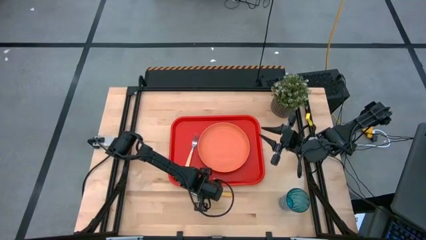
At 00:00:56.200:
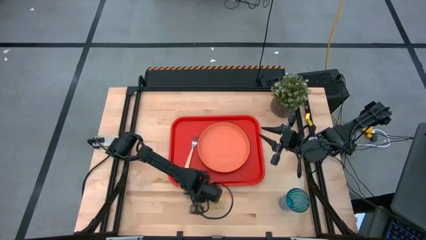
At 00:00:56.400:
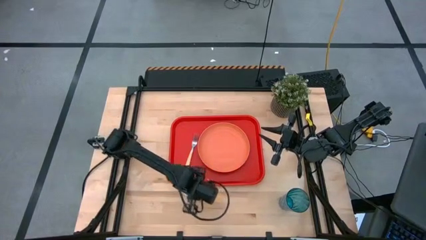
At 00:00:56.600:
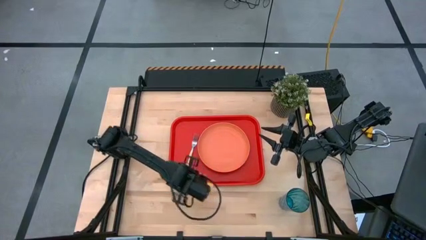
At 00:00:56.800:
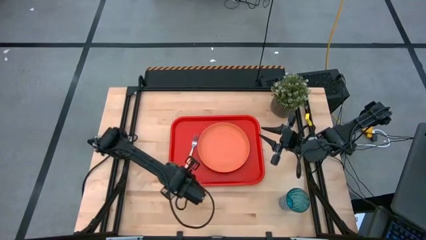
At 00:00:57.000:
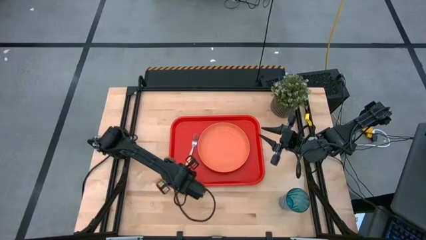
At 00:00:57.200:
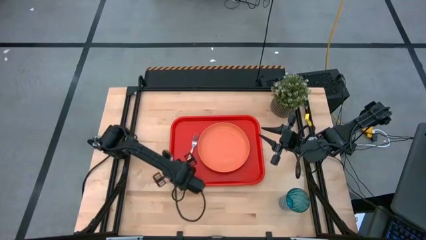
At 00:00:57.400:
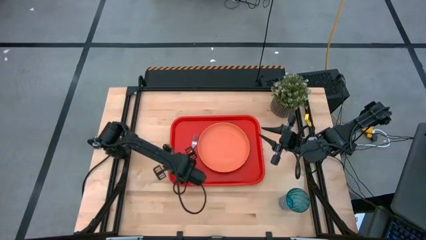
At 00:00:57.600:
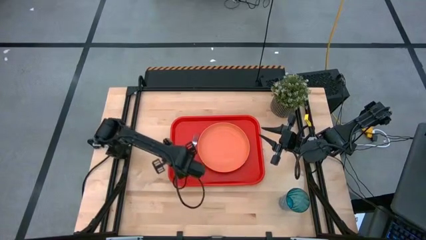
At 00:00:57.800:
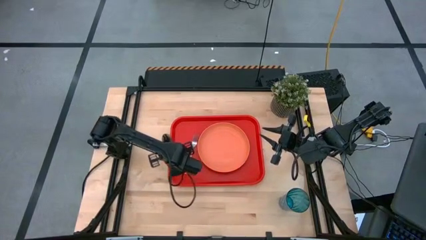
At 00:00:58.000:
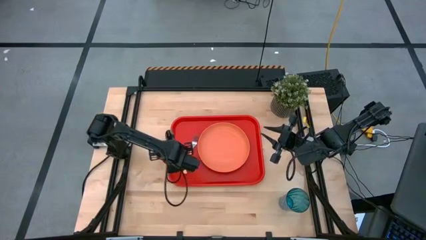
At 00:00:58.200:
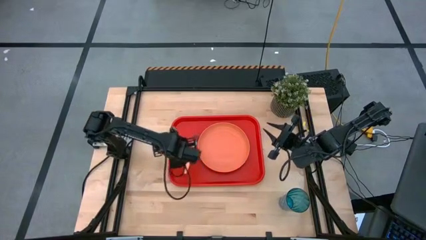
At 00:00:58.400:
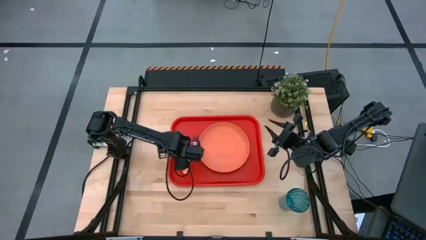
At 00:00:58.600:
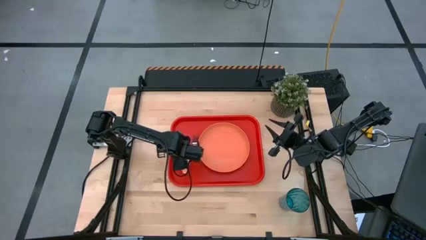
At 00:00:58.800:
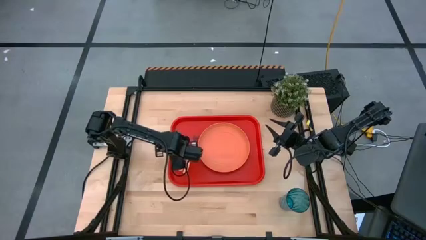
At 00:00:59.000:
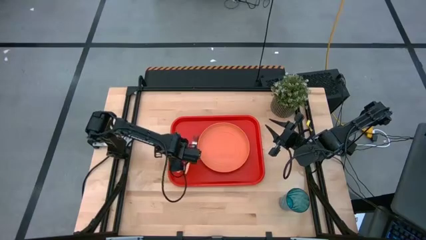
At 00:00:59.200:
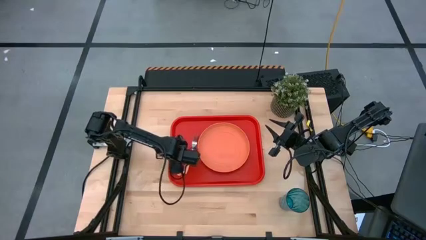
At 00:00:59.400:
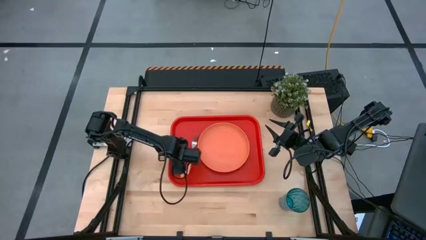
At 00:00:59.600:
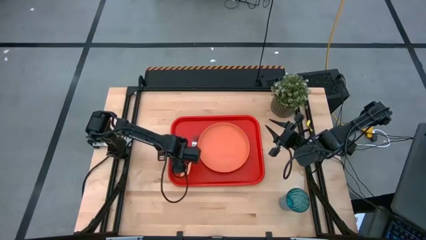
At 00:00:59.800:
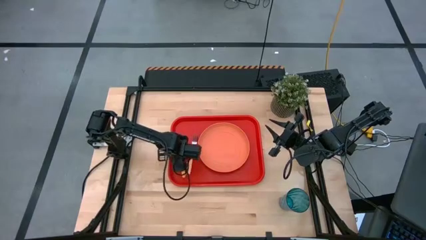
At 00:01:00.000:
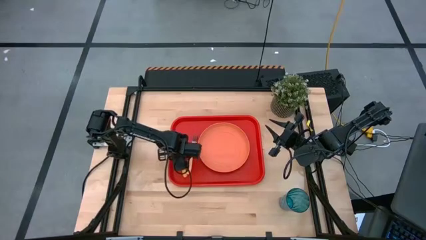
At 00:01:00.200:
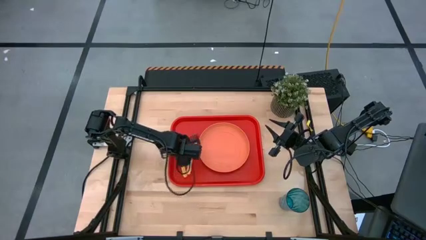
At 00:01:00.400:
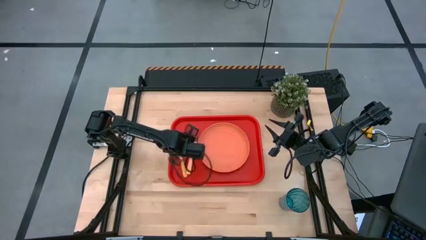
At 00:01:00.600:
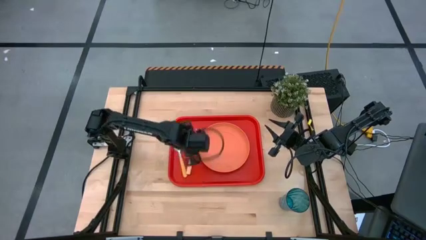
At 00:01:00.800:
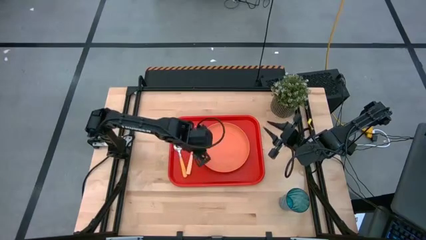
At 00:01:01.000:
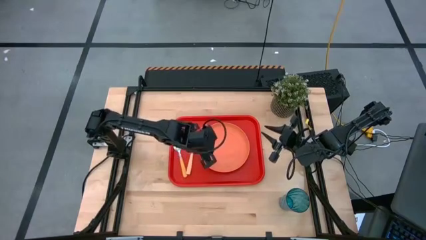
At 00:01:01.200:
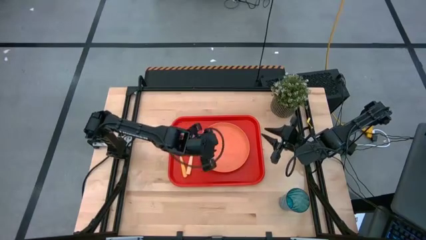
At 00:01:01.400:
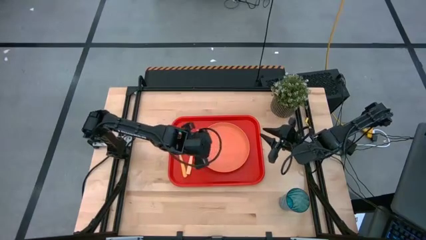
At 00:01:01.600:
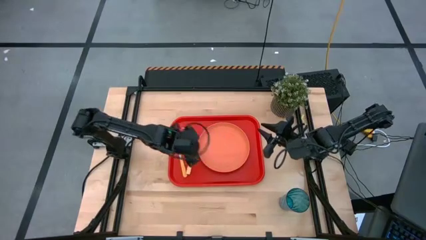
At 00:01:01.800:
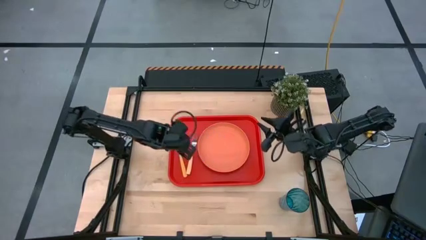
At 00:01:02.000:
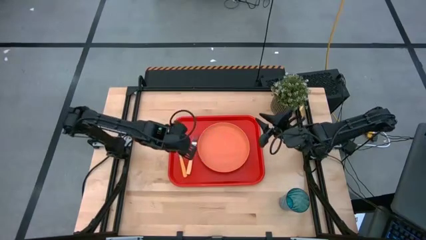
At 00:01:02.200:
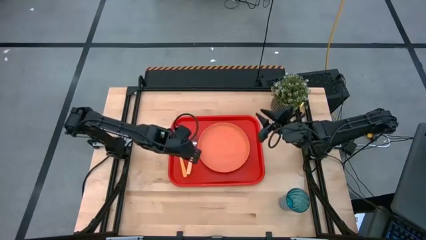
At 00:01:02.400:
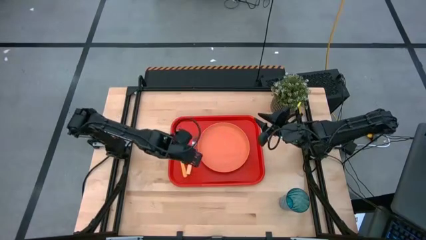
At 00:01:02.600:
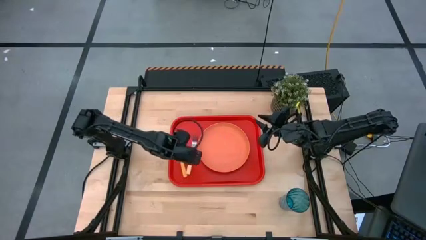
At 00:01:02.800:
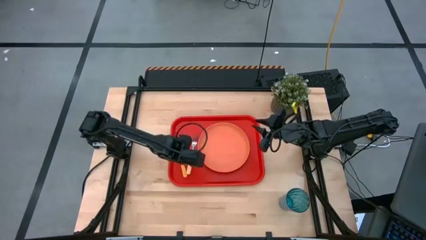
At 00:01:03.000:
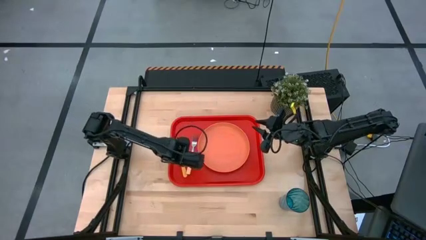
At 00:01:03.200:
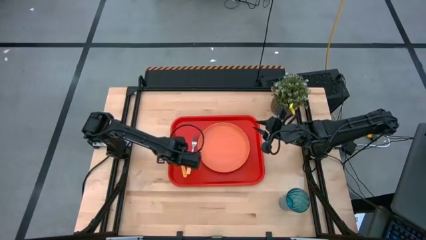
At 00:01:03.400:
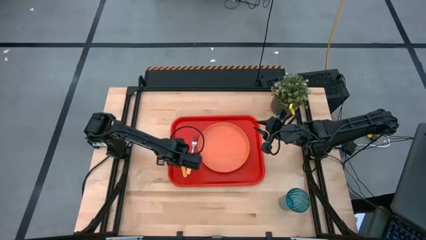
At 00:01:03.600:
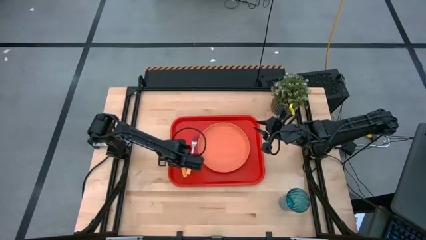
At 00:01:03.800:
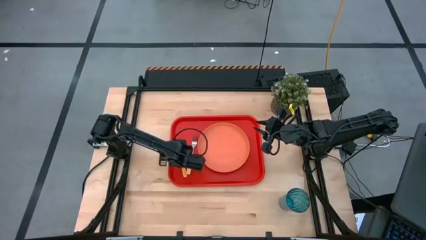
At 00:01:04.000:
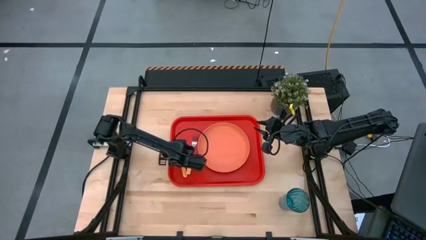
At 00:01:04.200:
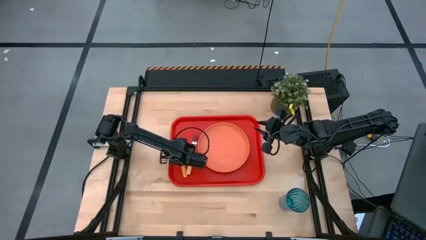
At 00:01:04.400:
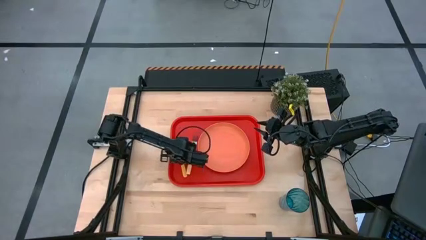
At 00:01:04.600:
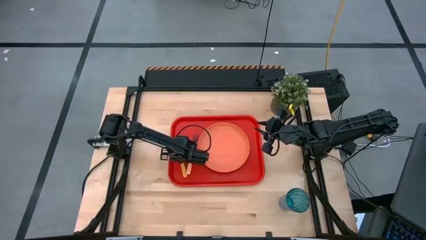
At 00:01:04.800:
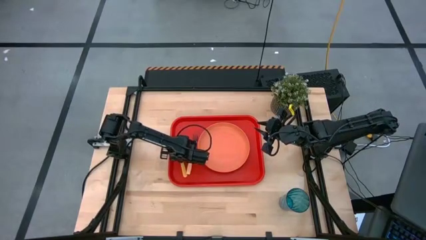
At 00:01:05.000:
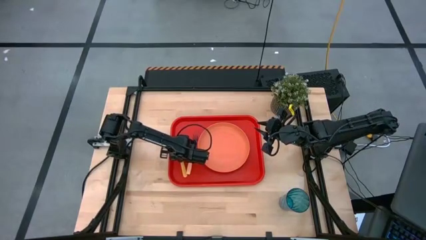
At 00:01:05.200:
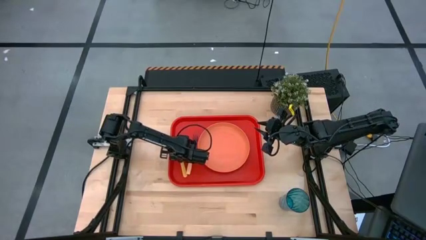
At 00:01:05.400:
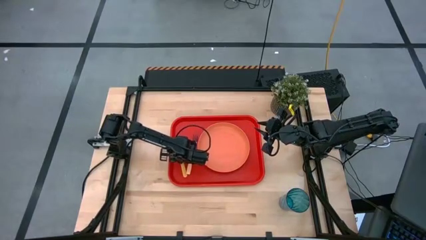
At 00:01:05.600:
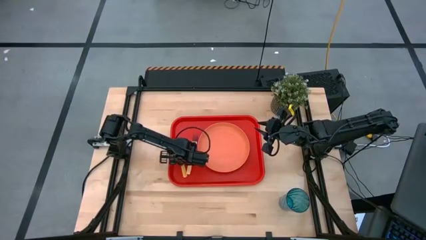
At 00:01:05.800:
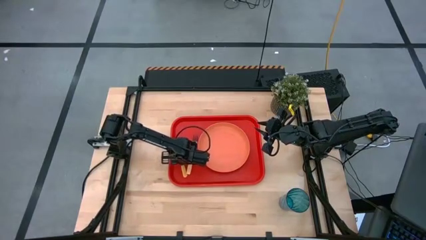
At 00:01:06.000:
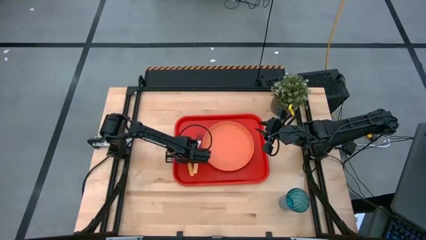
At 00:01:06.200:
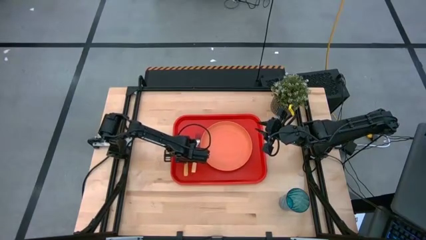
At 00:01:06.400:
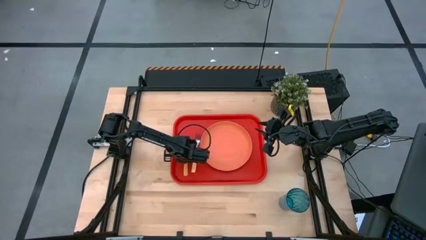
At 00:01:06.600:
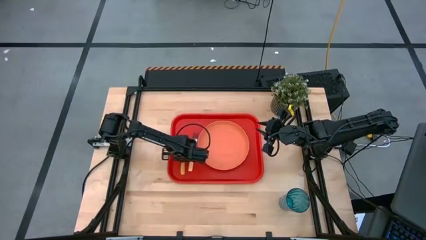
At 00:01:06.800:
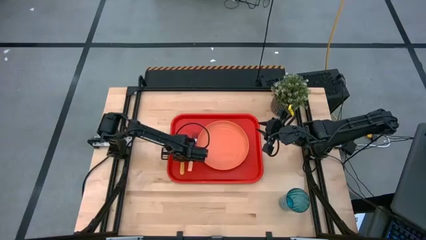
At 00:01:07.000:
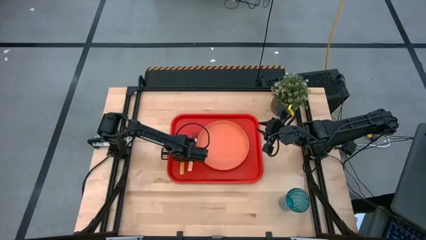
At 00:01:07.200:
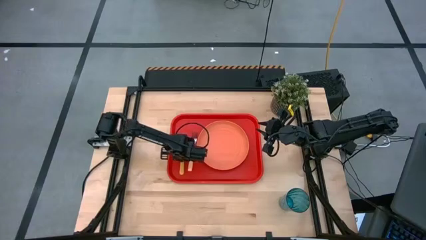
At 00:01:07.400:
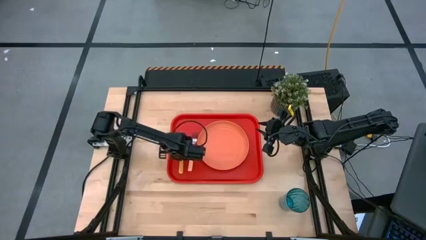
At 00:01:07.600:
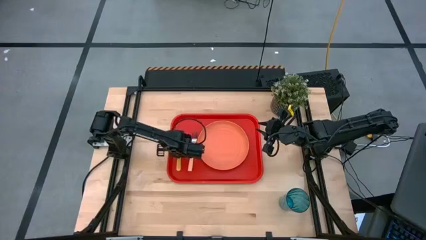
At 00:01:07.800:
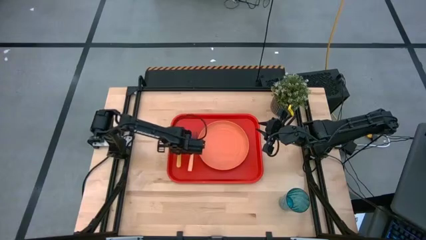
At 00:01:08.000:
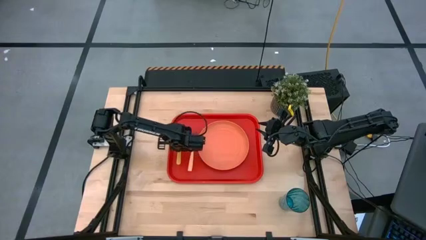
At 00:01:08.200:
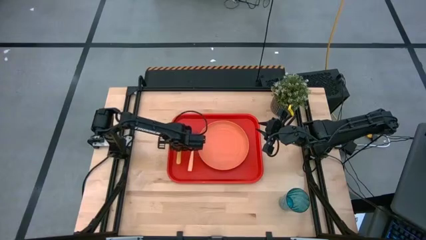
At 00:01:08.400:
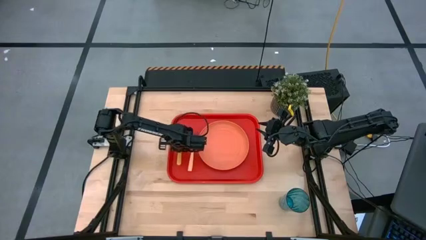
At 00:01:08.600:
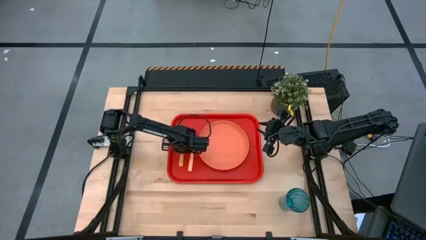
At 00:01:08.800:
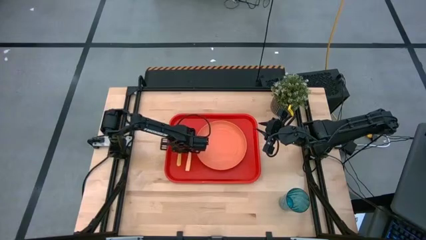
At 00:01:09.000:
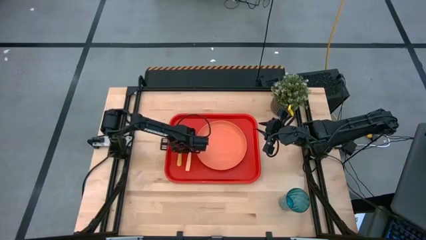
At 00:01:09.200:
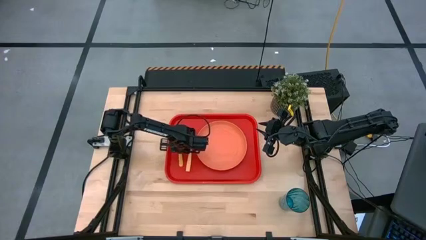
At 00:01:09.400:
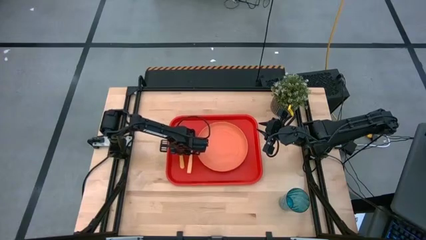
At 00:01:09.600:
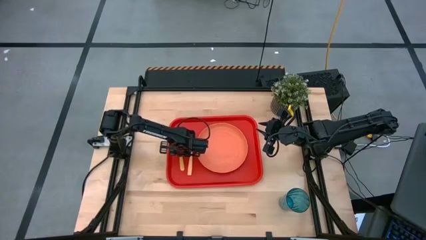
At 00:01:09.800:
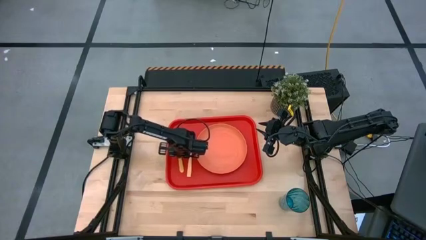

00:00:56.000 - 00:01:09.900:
Task: Pick and place plate/cup/fork/spoon on tray
Put the yellow spoon on the orange serving tray
